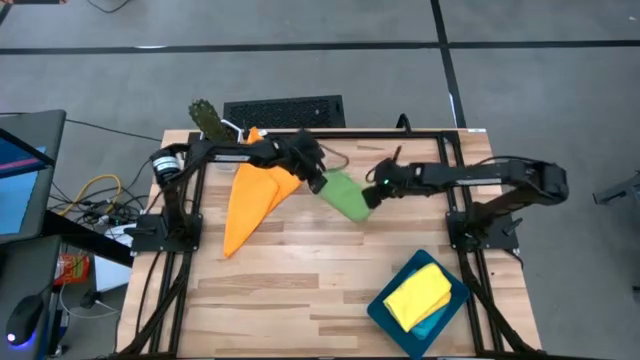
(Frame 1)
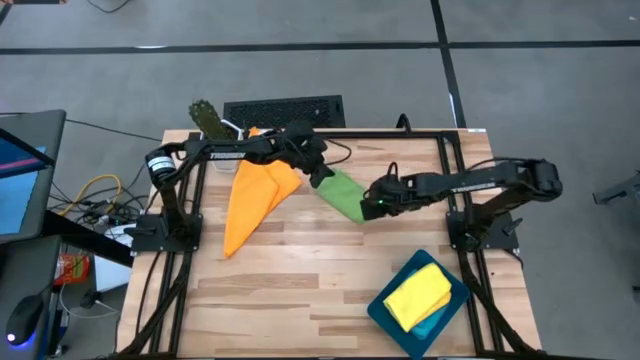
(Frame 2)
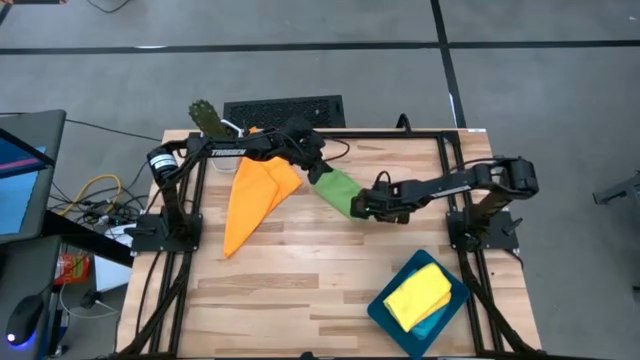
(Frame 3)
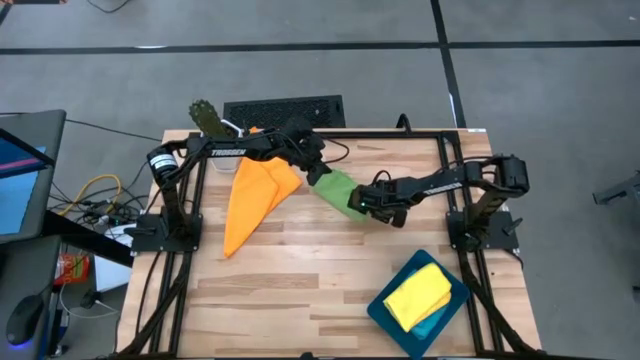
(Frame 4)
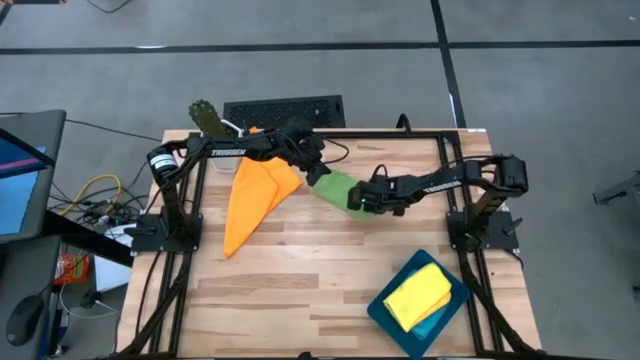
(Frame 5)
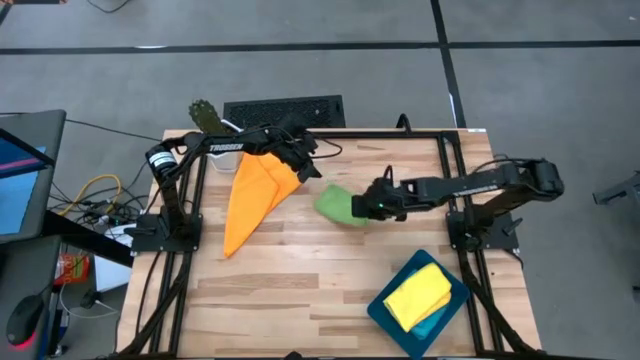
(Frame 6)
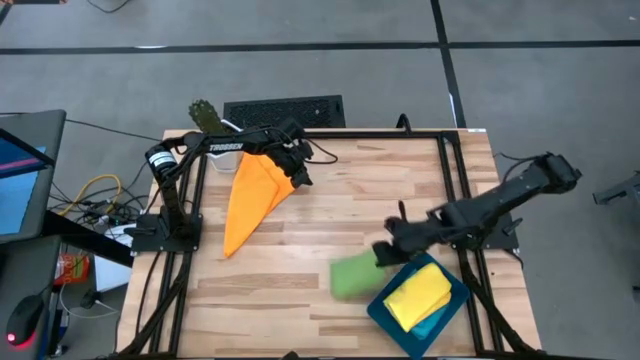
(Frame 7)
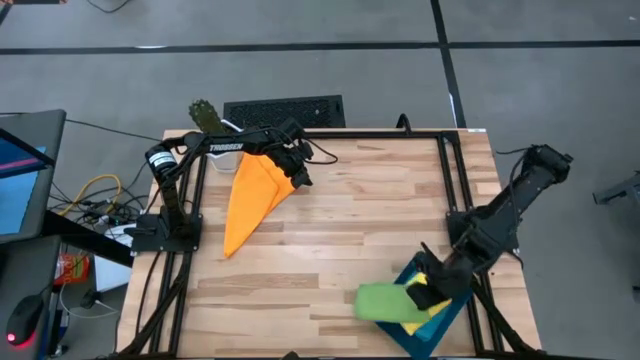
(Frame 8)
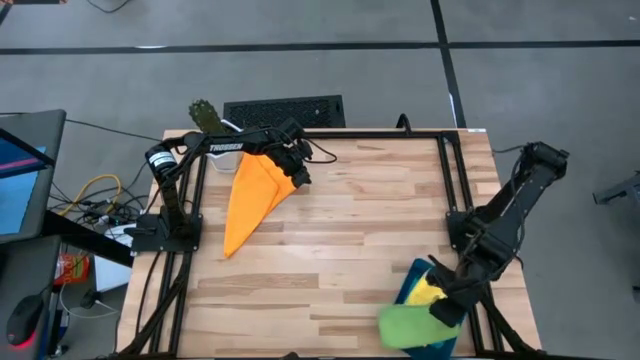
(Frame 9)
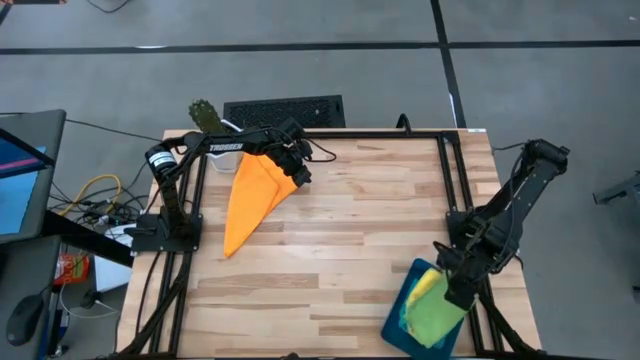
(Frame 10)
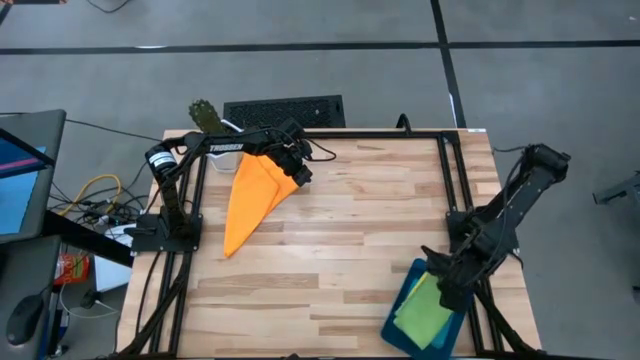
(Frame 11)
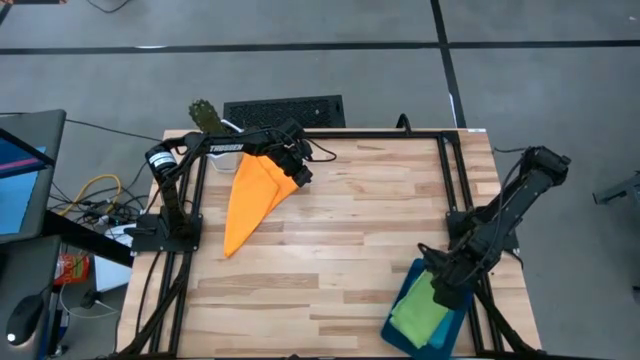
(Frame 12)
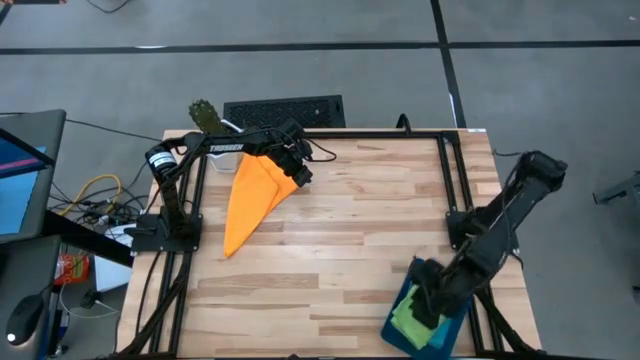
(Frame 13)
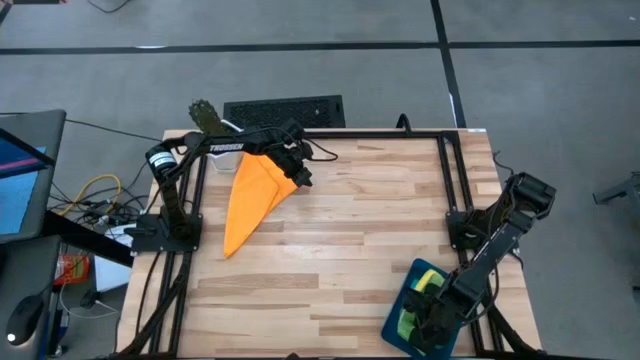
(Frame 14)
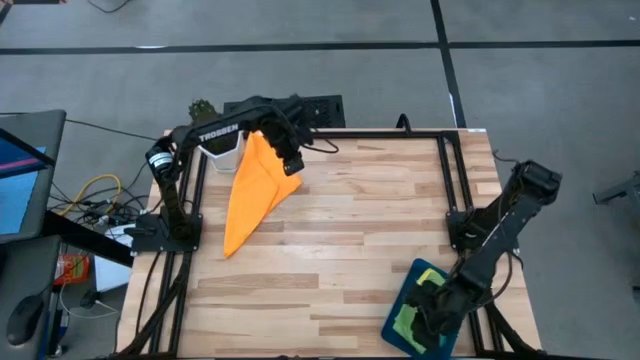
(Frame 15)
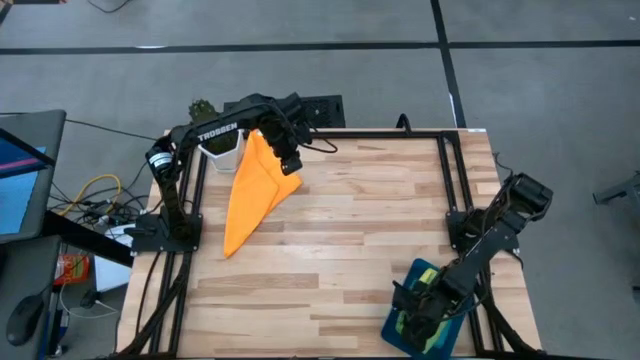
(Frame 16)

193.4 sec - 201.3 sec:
Task: Fold microfiber towels
Put the folded green microfiber towel into the blue bin

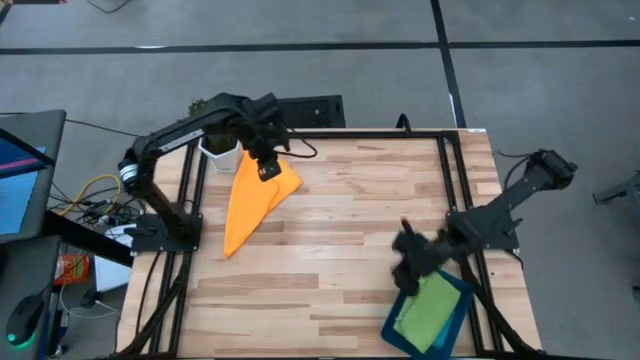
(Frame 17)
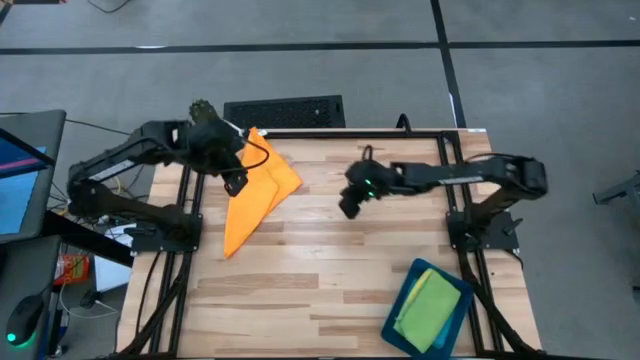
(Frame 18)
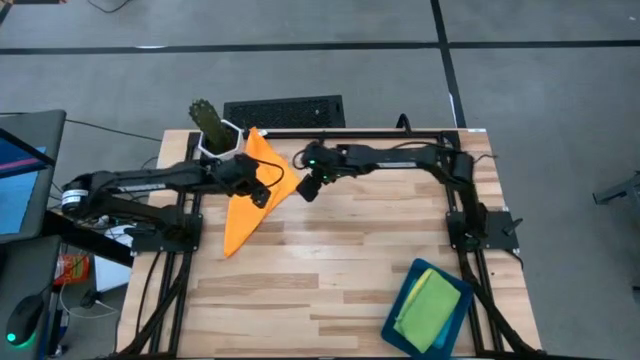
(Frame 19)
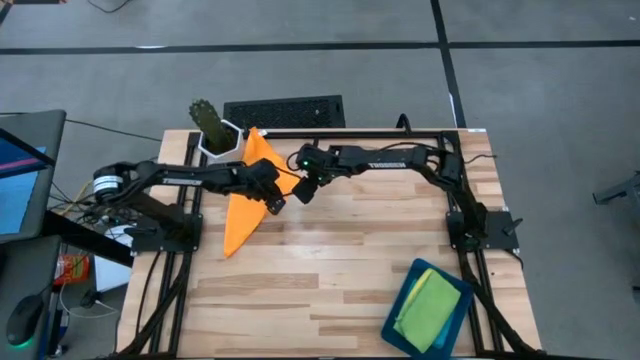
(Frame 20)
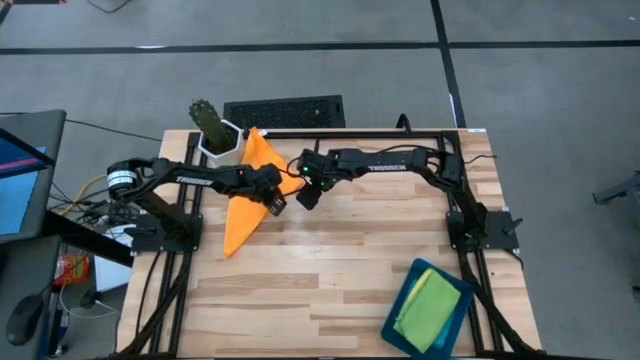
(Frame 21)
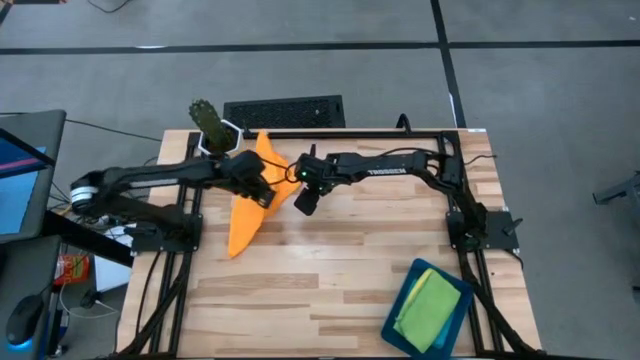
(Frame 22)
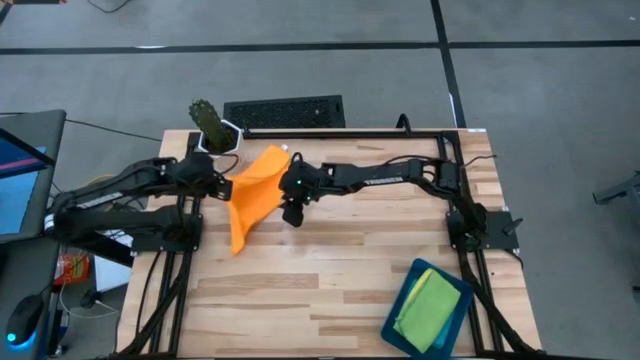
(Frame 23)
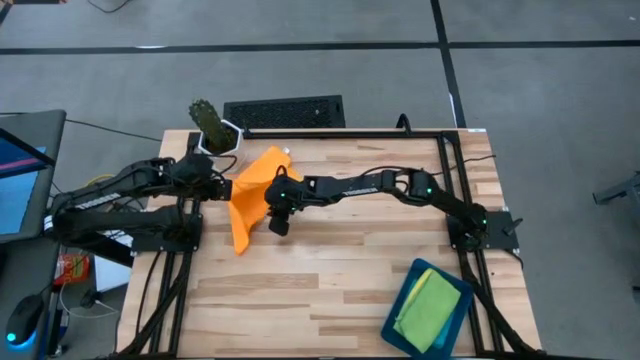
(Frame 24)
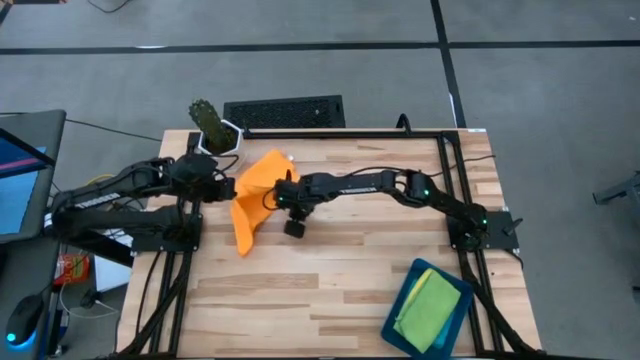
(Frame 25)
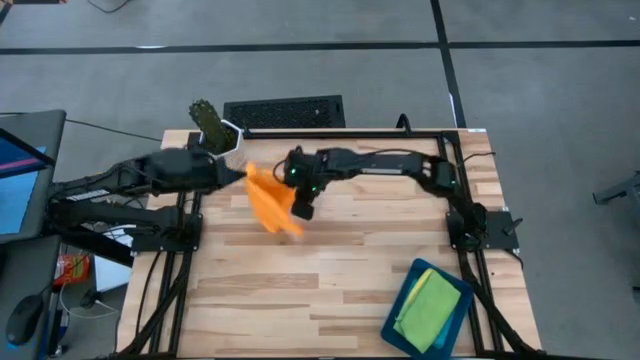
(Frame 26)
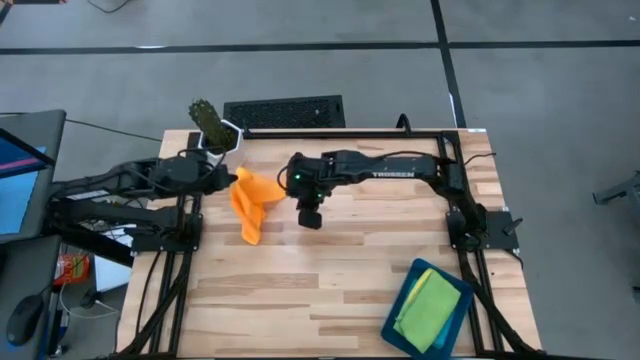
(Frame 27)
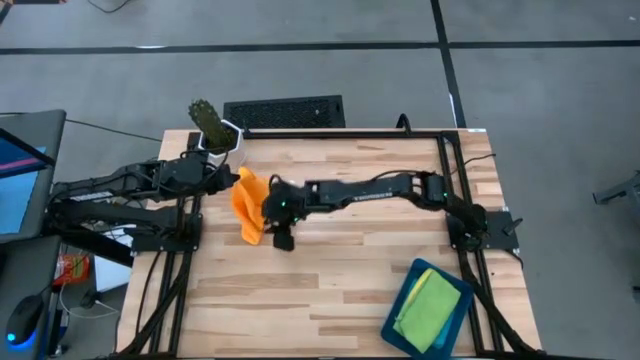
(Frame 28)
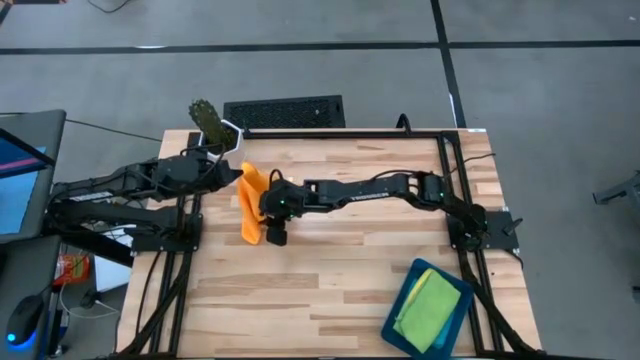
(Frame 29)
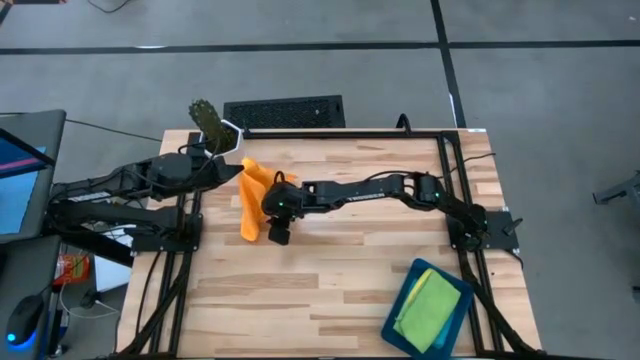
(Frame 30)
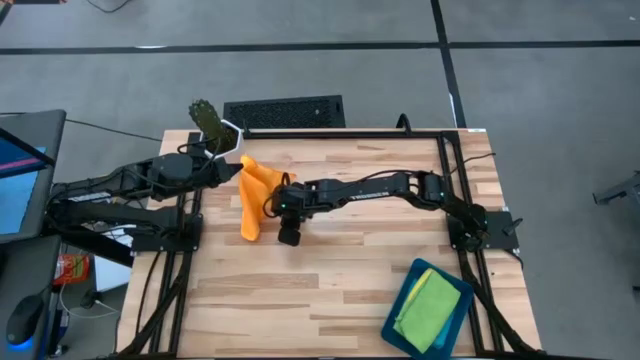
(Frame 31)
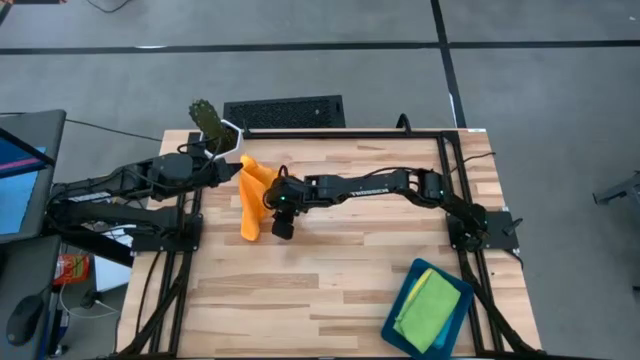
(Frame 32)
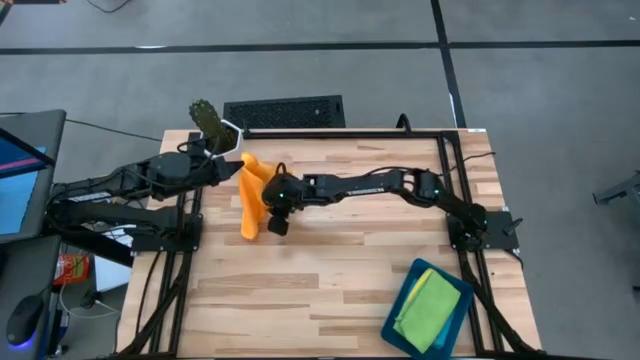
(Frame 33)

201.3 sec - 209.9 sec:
Fold the orange microfiber towel

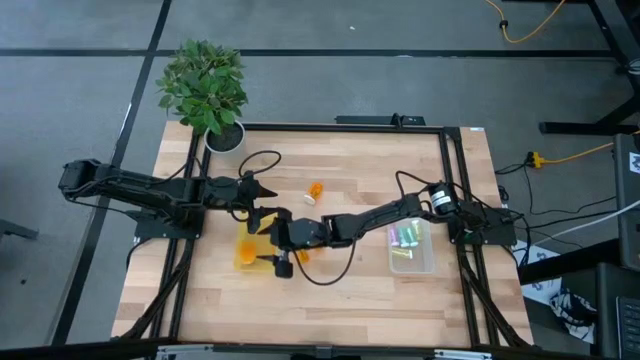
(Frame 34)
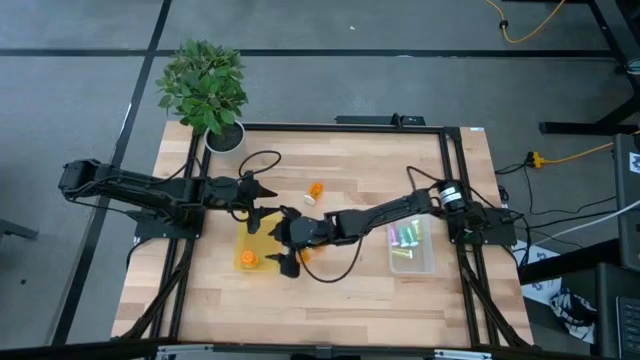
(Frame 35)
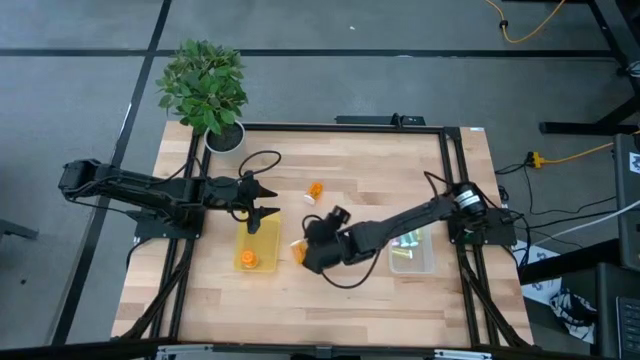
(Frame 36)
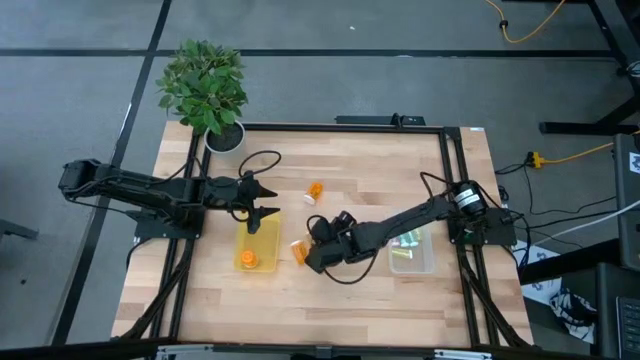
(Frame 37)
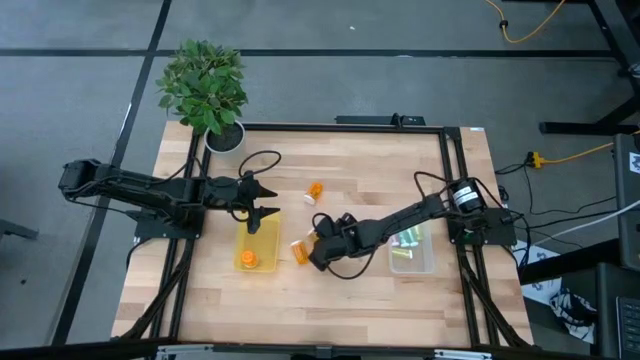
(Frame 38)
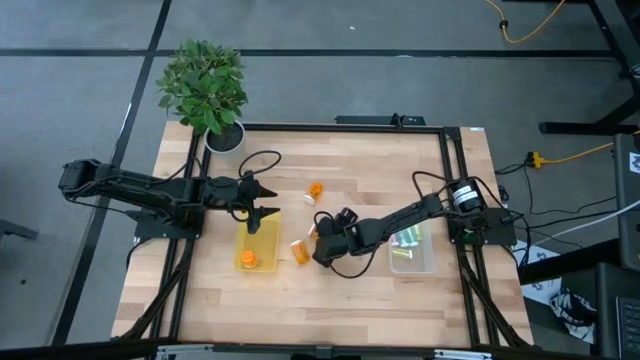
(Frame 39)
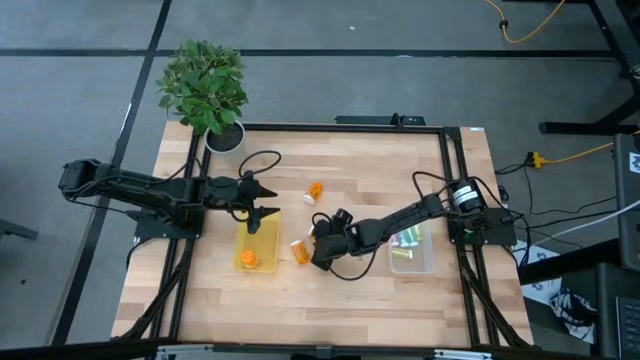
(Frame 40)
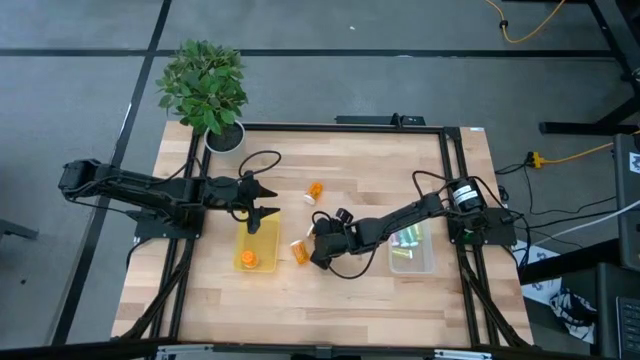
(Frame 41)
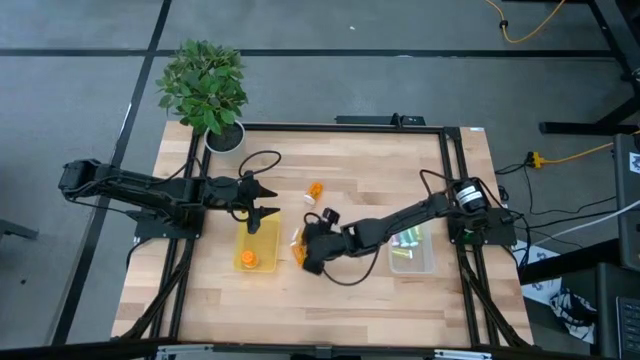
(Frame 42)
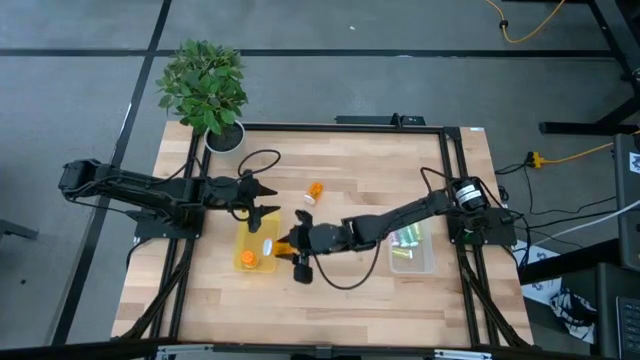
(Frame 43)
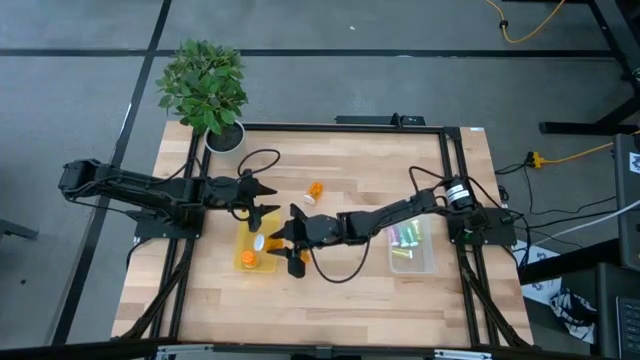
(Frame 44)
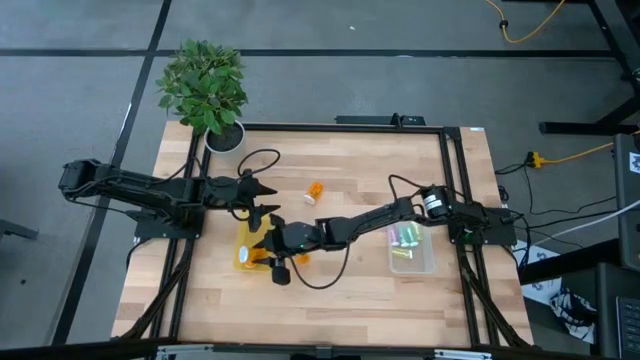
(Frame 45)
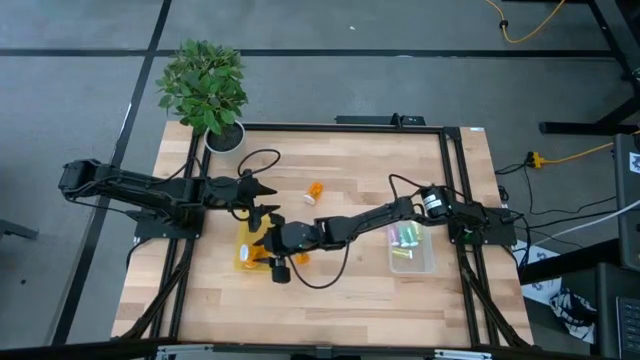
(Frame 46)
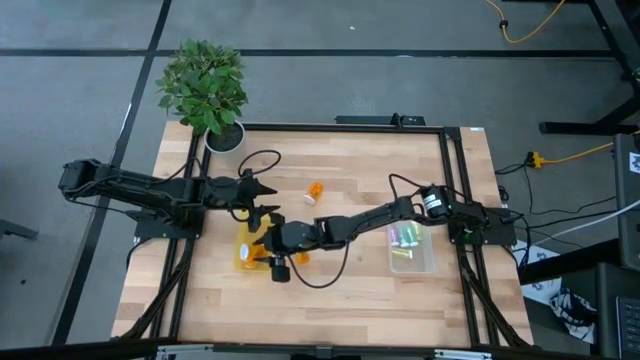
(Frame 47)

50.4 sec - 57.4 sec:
Task: Pick and place medicine bottles into bin by pill shape (circle, oval)
Put the orange pill bottle into the yellow bin
